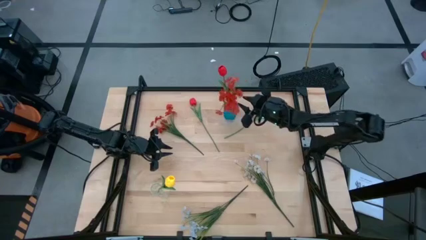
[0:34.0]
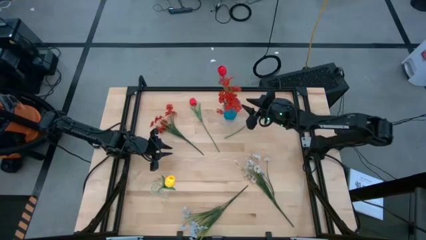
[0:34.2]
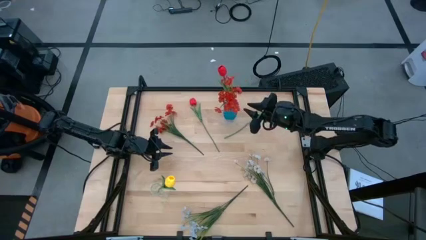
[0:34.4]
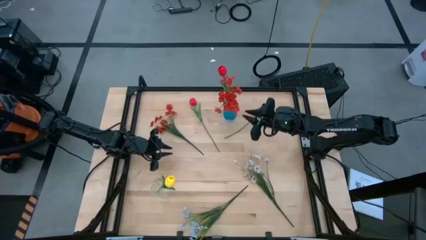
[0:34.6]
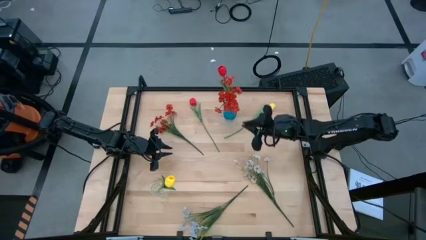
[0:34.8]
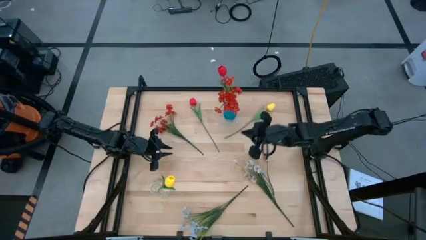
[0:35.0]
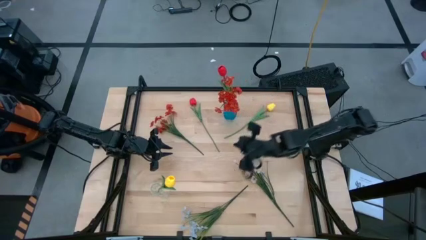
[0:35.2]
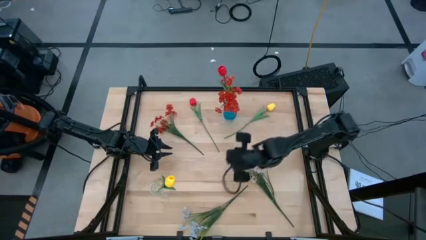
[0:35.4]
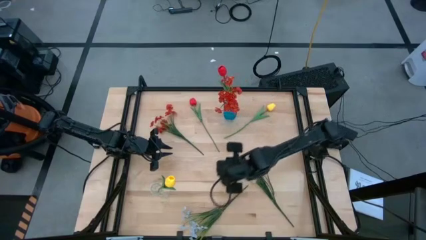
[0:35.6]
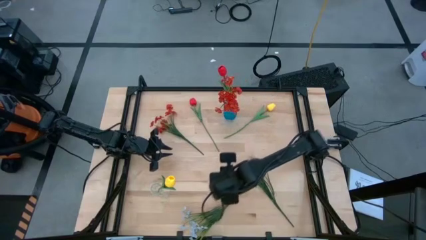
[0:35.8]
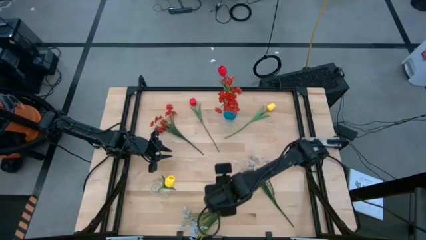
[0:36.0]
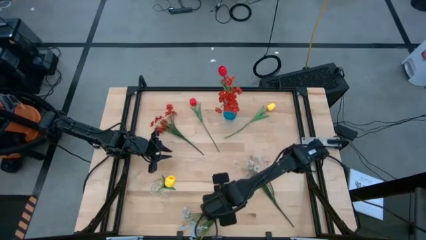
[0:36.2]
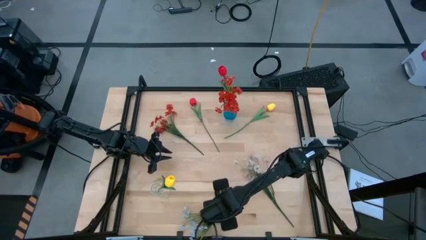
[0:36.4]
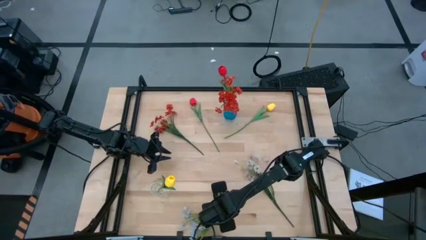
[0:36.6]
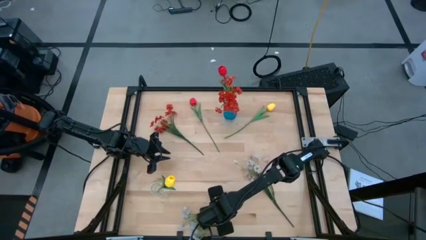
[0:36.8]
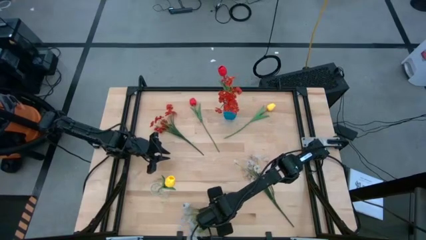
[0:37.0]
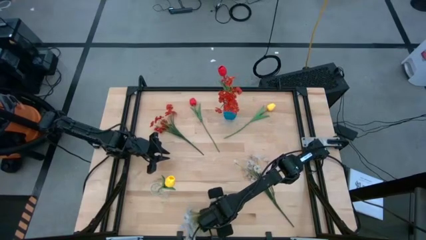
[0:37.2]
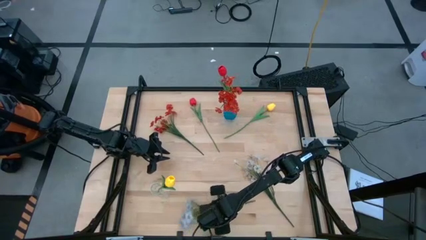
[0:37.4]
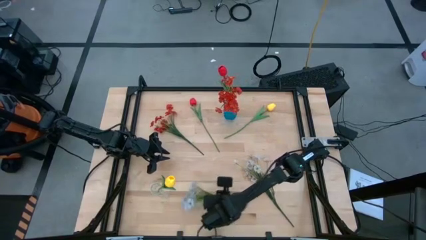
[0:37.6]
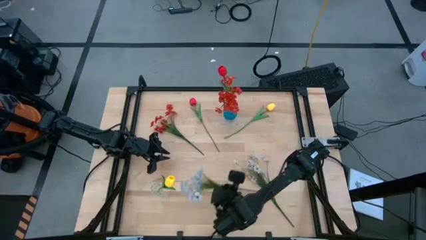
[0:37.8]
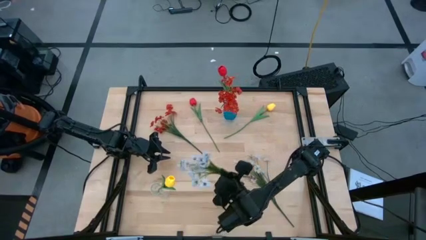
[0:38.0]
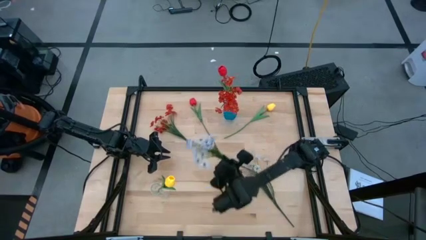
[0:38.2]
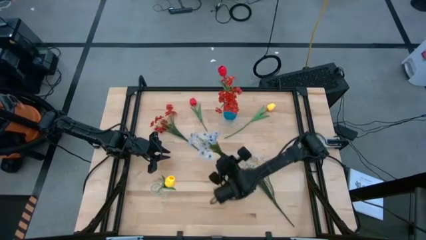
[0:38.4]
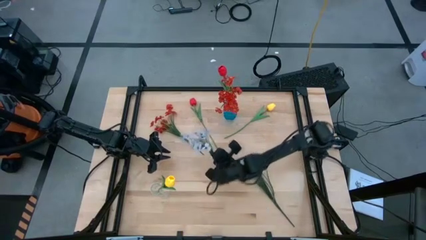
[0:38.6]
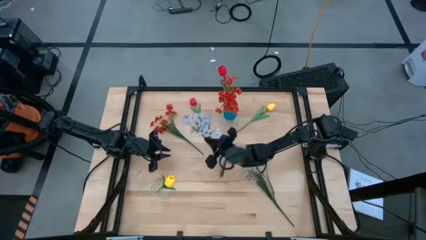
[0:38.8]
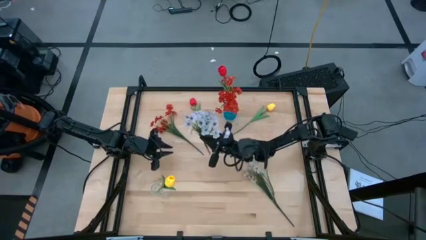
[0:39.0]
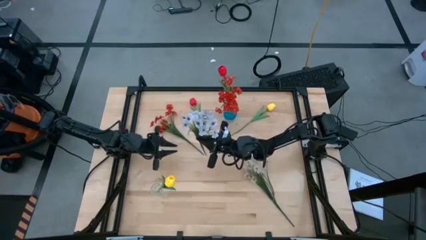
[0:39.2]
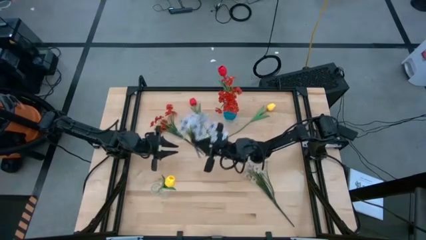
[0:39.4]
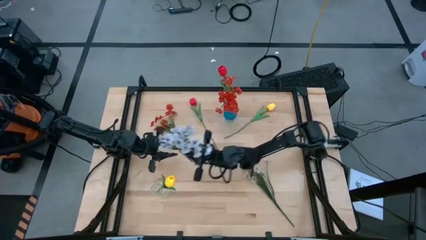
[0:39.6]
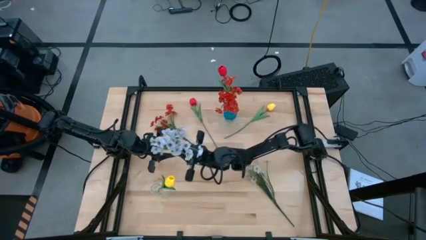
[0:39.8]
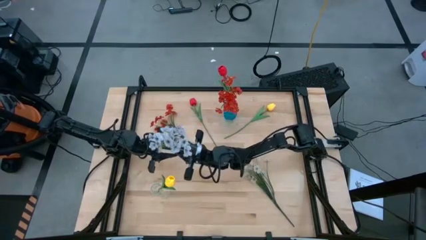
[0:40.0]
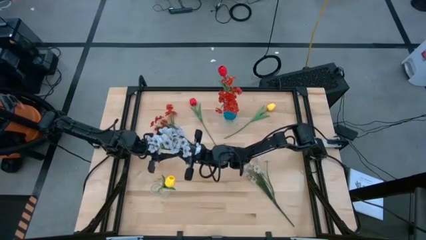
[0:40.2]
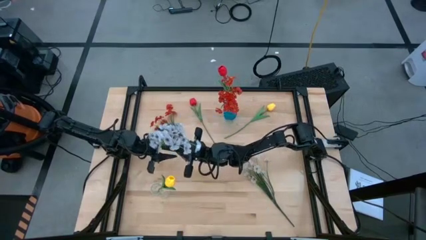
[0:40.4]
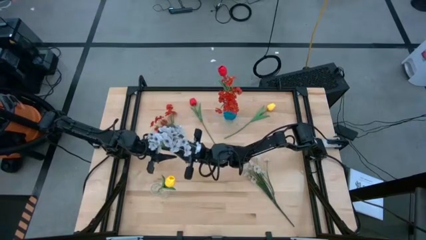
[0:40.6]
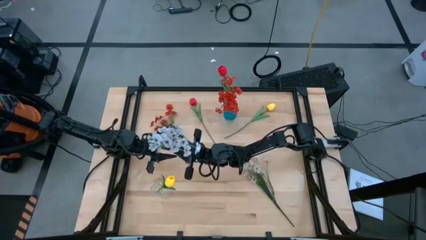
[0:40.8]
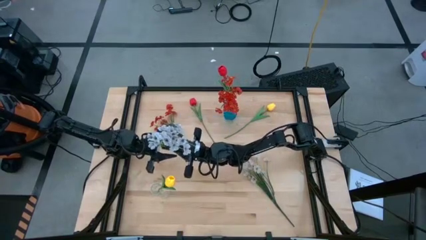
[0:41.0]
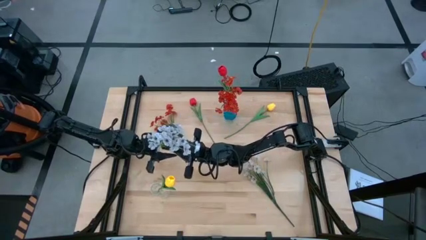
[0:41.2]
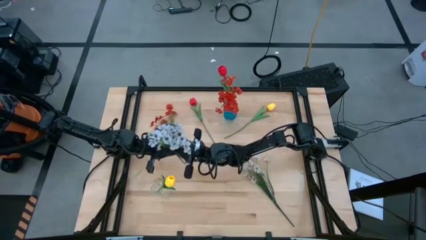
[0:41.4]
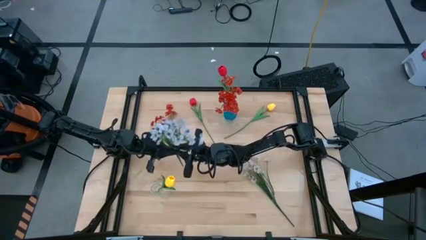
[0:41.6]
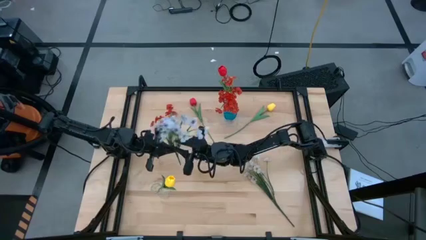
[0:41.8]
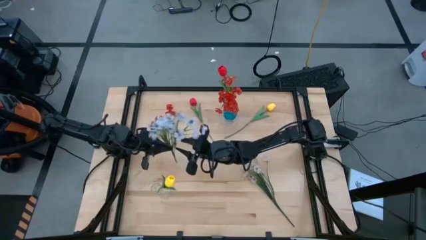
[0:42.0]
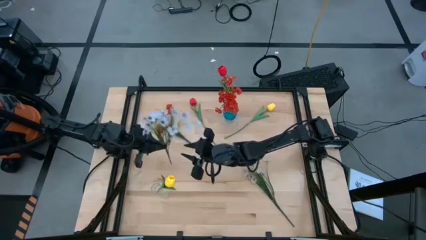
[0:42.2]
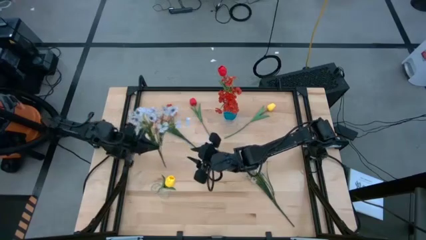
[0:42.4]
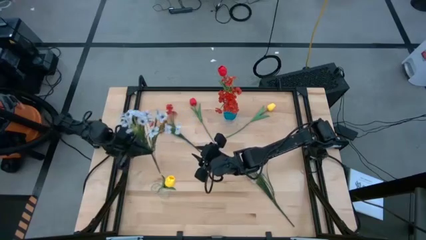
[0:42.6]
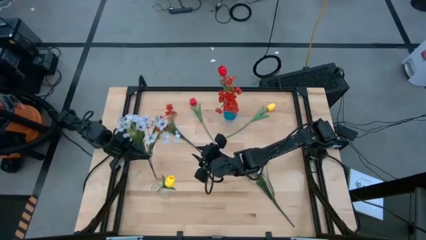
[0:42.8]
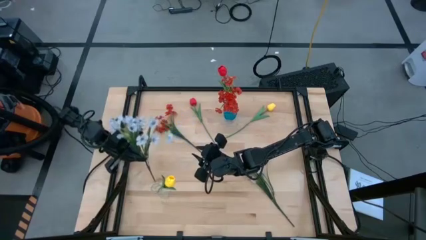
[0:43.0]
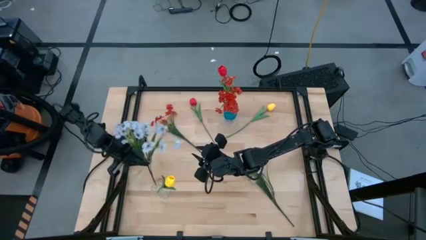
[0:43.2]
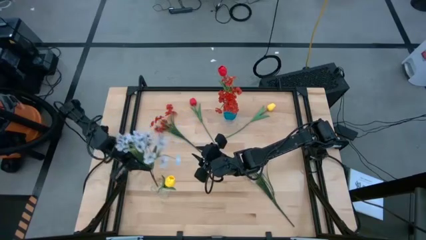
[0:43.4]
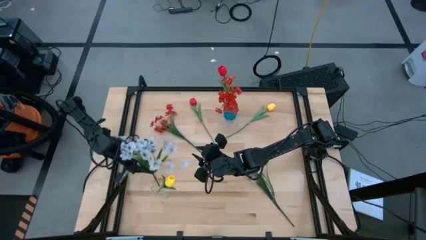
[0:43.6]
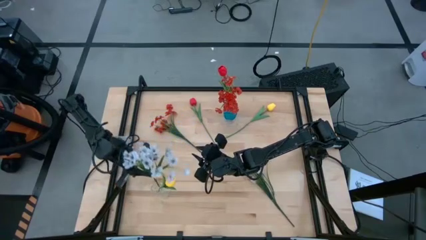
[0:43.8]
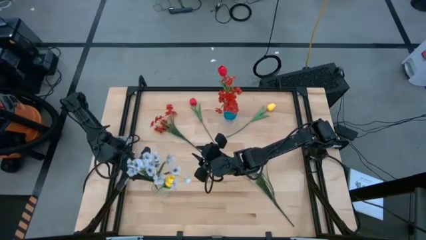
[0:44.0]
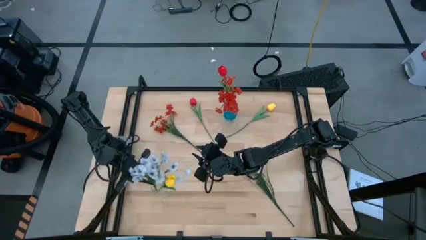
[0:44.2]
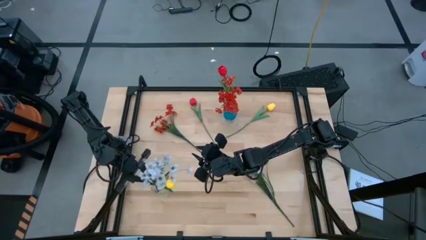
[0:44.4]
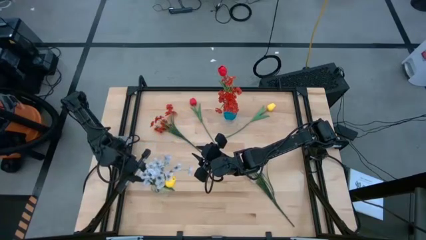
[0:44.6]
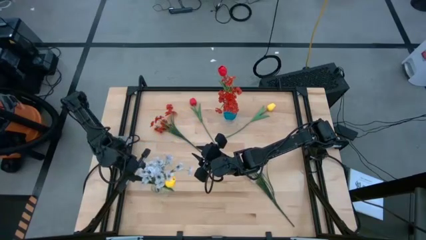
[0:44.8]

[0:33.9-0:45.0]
Task: Sort flowers into vase by color
Put the bottom white flowers into the transparent vase

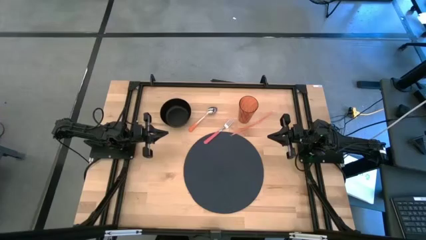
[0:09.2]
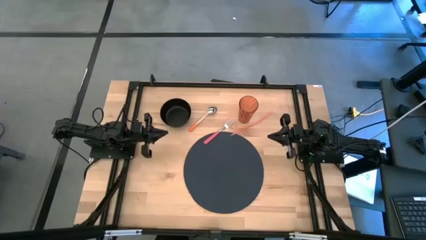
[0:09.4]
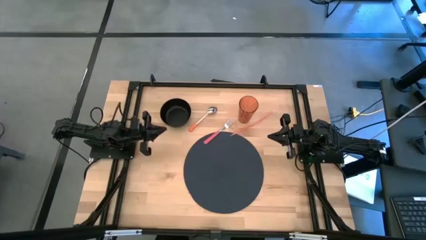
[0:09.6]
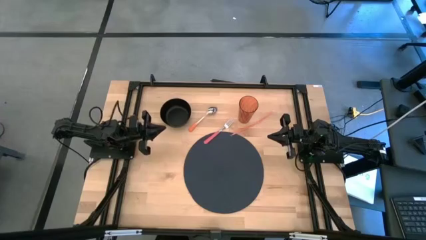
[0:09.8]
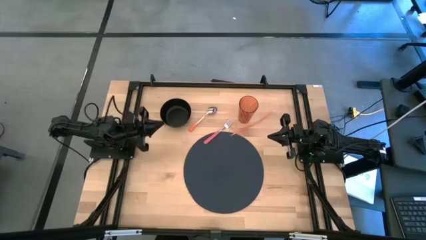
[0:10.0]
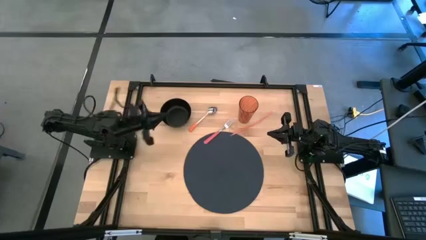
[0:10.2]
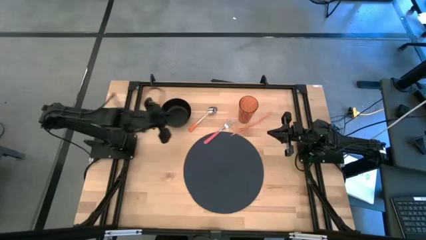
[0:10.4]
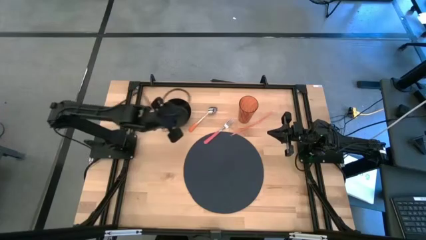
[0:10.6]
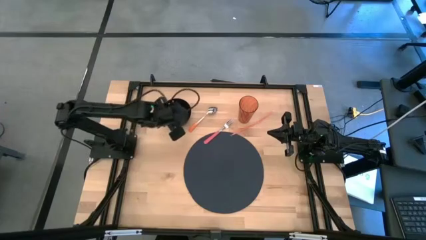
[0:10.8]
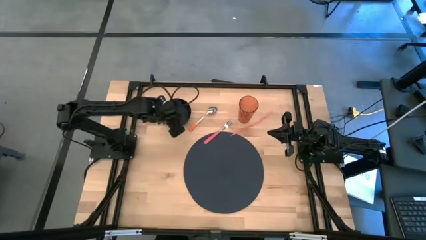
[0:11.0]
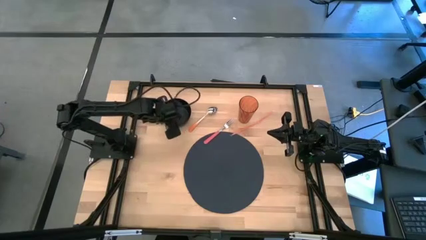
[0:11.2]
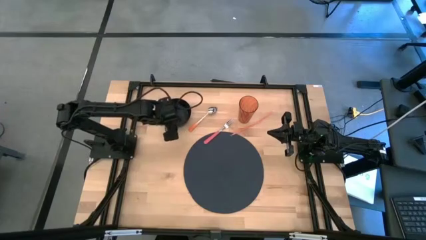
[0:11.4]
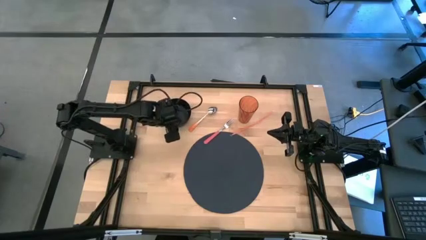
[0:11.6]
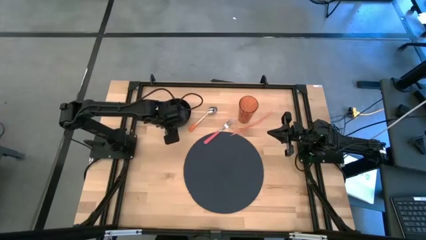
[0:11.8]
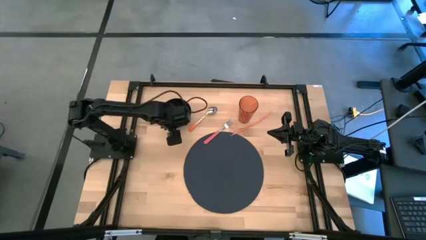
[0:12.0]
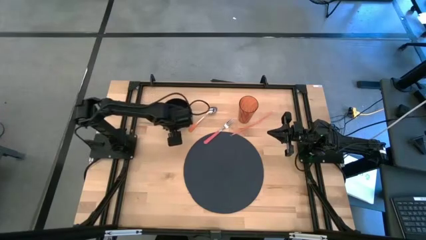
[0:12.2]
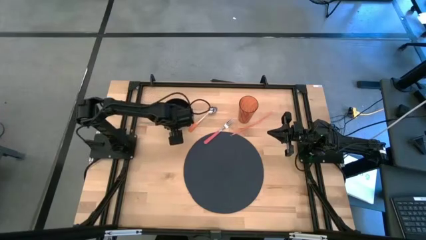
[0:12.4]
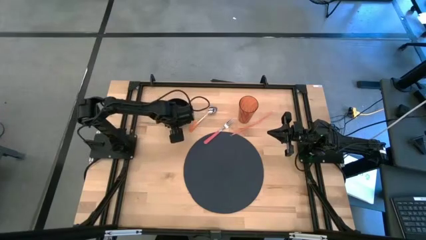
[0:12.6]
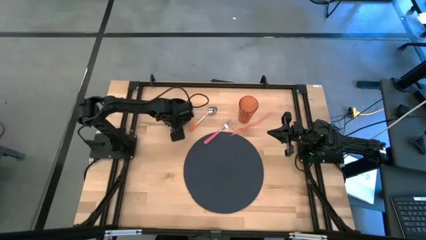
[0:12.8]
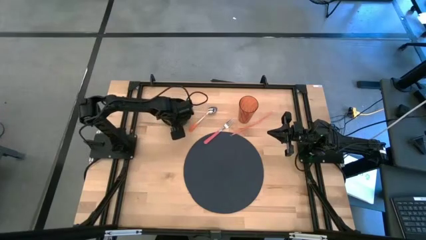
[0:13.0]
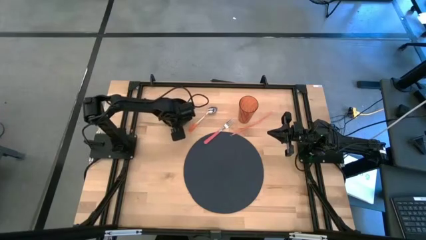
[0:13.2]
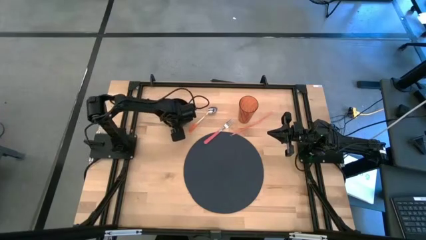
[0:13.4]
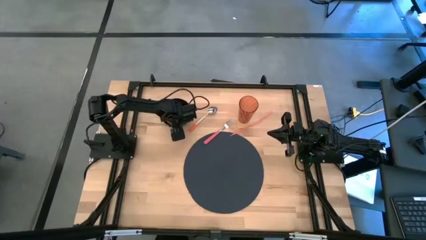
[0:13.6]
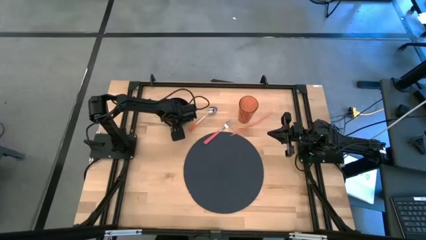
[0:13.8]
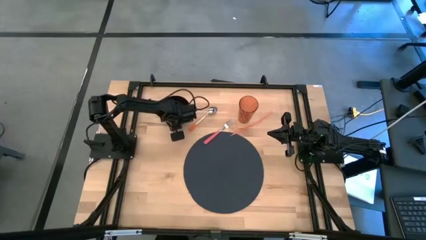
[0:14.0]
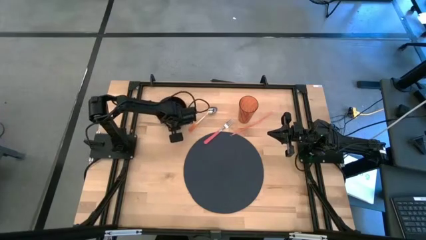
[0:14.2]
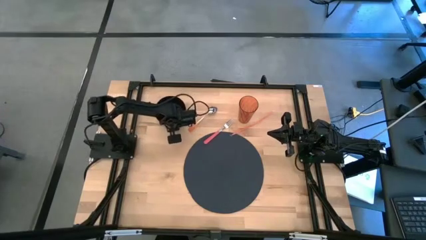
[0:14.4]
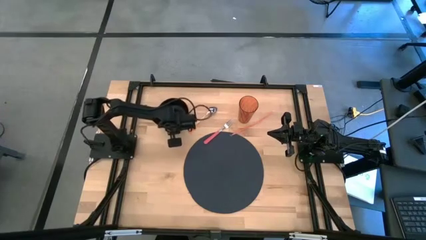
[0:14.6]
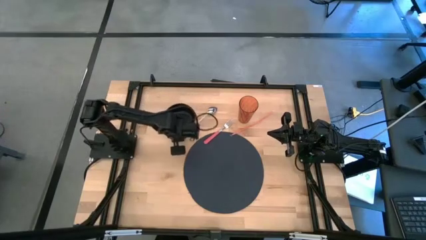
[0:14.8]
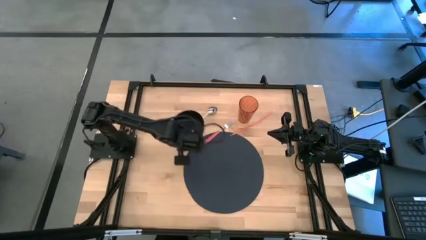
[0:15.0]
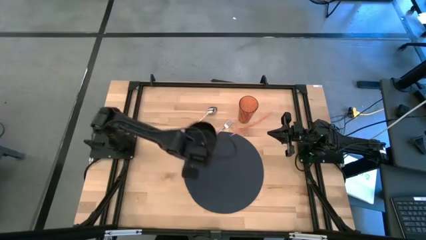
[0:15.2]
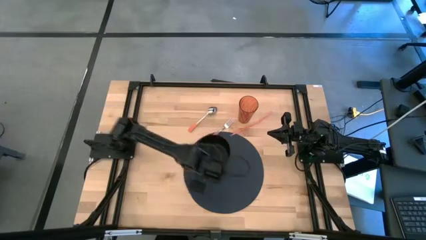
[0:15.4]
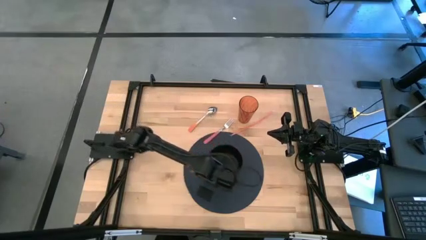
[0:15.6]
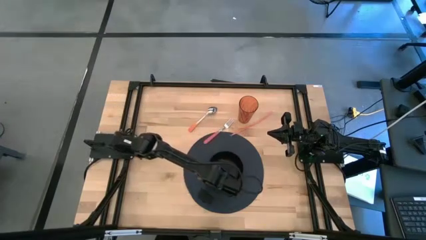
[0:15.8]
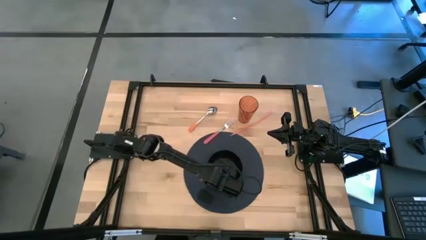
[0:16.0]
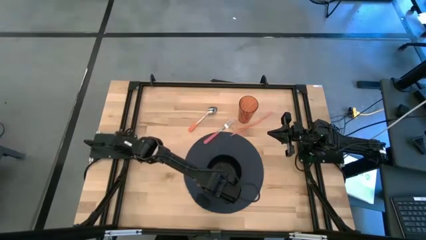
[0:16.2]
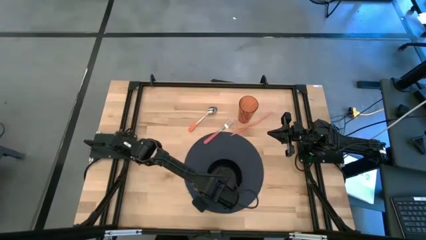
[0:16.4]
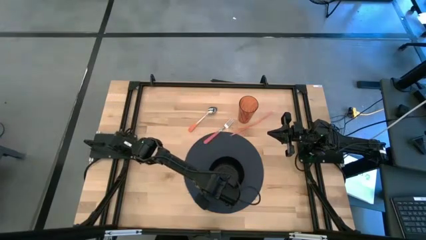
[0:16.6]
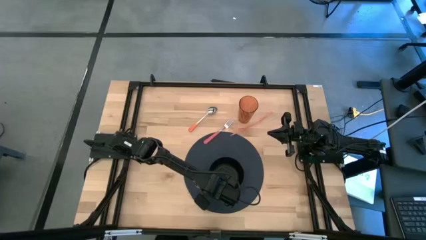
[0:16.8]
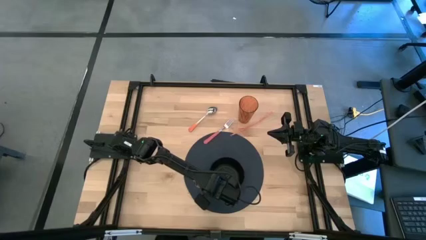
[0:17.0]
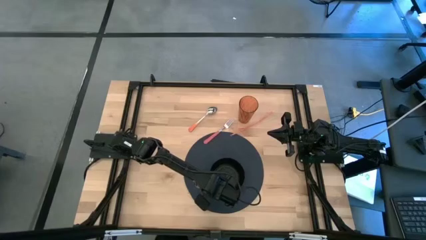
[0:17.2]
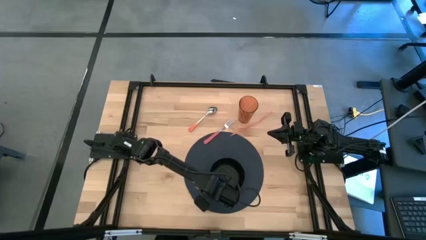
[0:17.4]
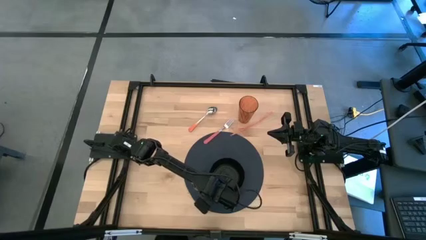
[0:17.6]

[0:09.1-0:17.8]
Task: Pick & Place Utensil
Put the black bowl on the center of the blue mat
